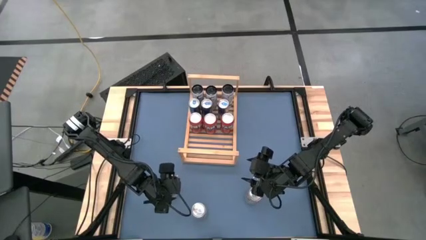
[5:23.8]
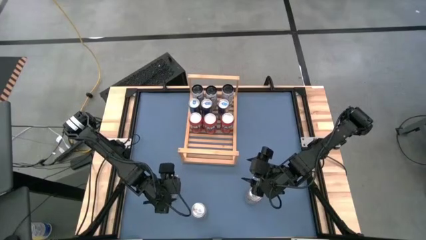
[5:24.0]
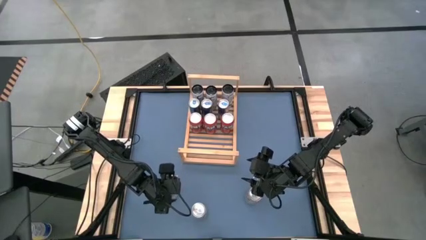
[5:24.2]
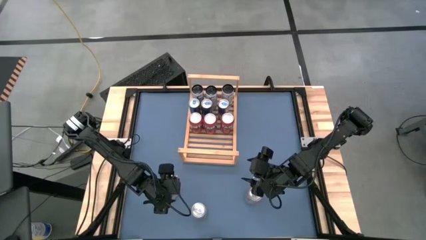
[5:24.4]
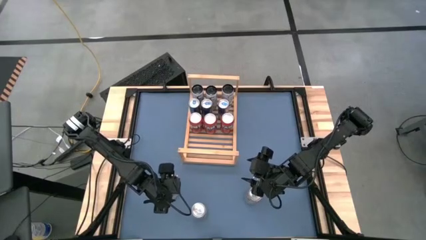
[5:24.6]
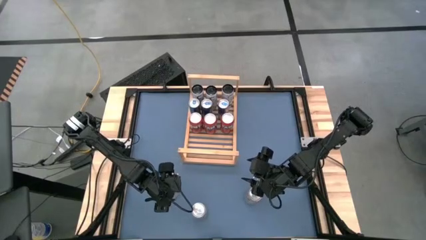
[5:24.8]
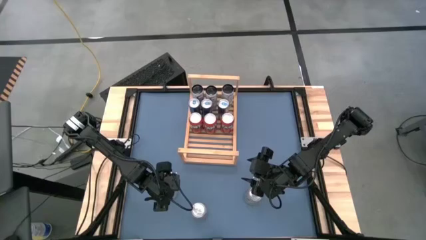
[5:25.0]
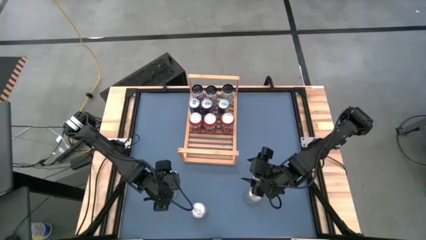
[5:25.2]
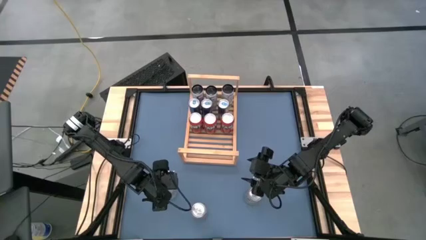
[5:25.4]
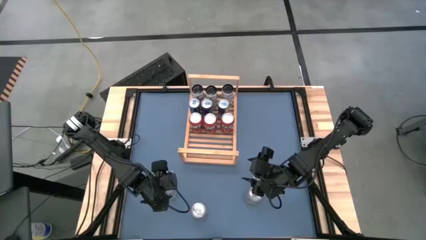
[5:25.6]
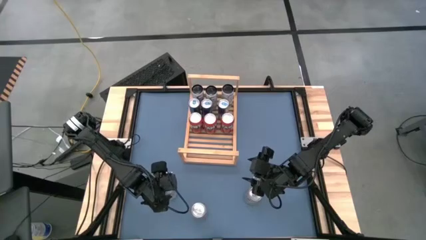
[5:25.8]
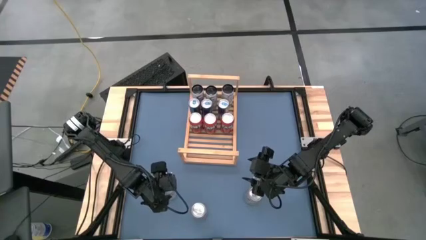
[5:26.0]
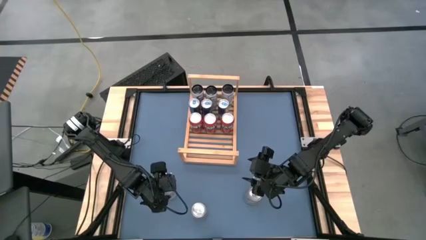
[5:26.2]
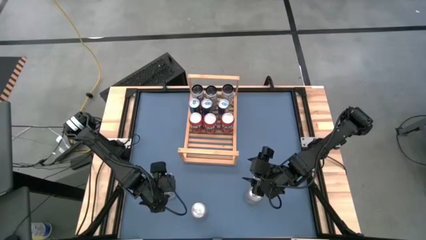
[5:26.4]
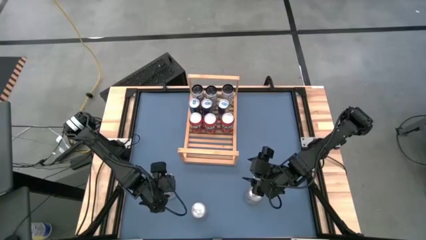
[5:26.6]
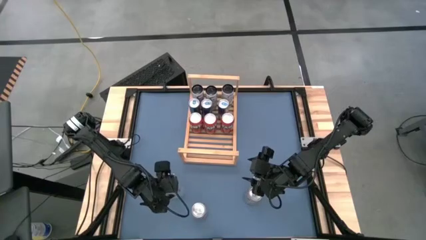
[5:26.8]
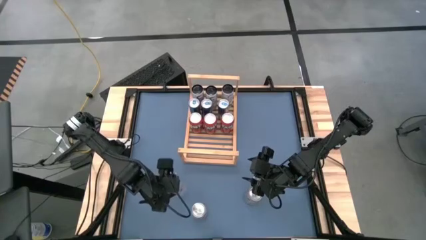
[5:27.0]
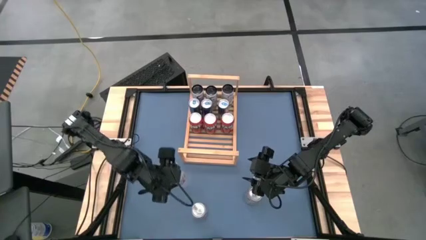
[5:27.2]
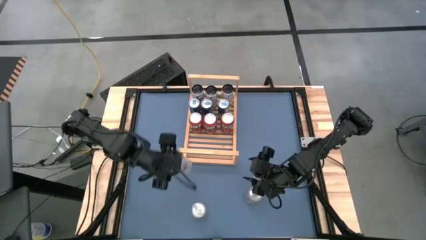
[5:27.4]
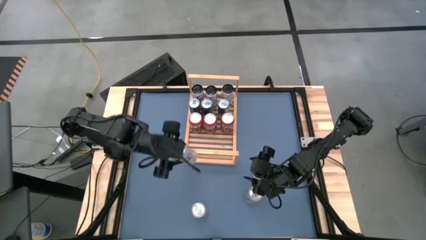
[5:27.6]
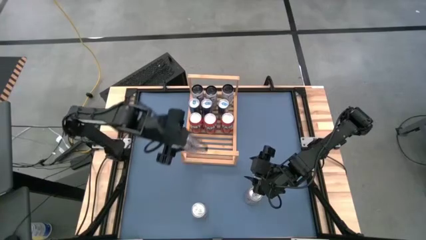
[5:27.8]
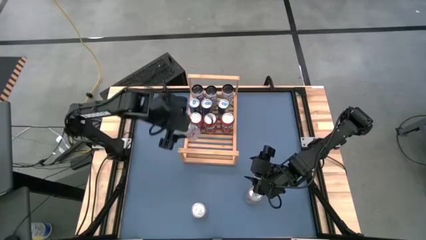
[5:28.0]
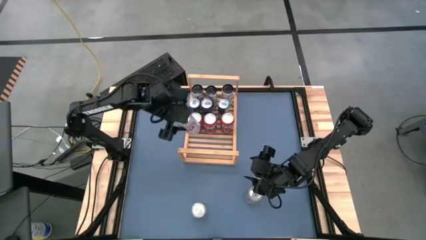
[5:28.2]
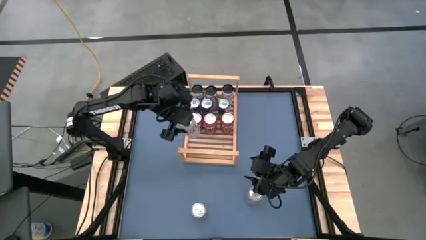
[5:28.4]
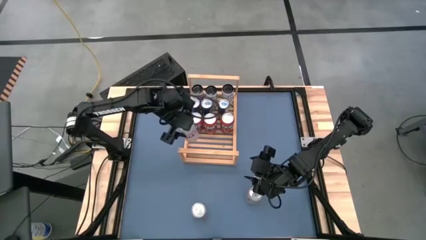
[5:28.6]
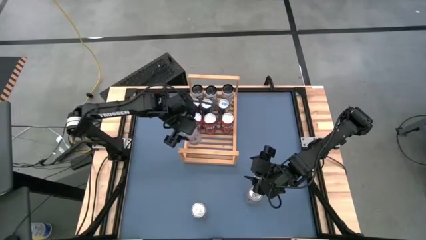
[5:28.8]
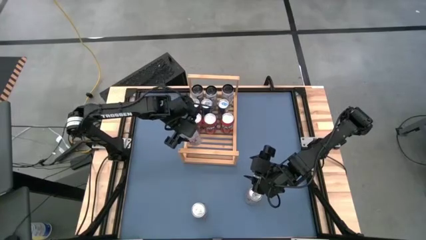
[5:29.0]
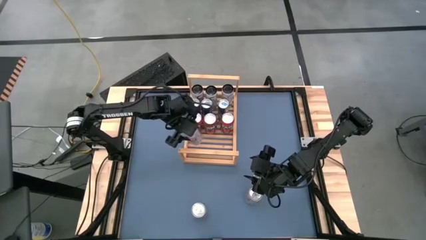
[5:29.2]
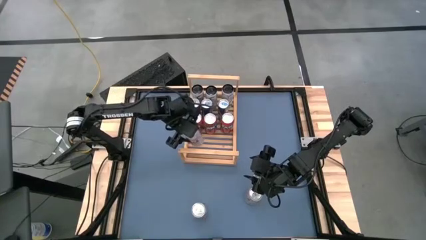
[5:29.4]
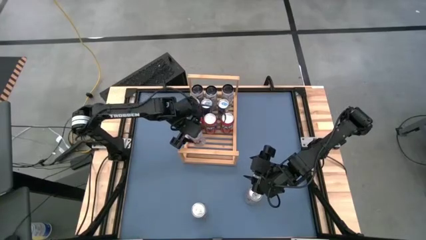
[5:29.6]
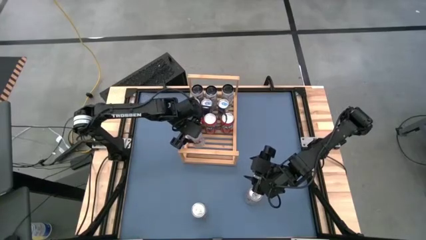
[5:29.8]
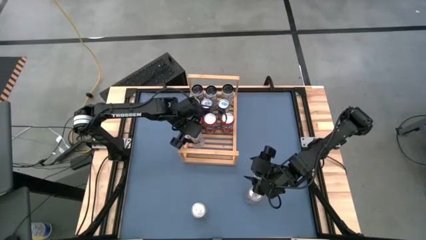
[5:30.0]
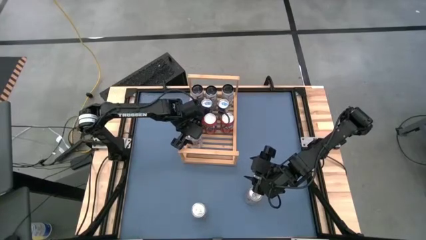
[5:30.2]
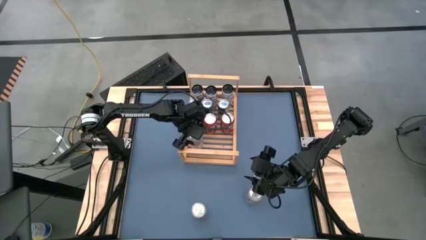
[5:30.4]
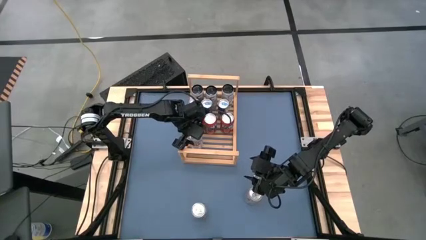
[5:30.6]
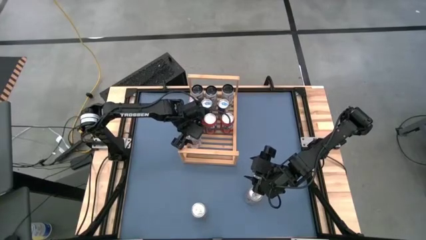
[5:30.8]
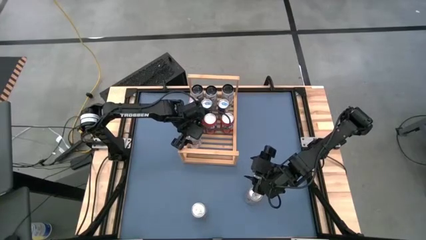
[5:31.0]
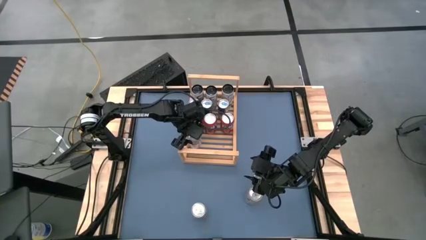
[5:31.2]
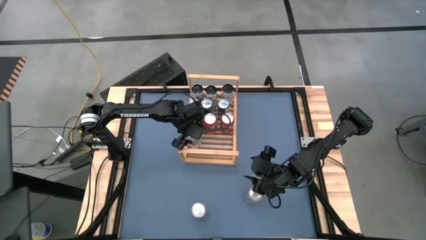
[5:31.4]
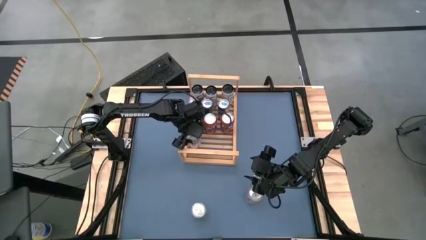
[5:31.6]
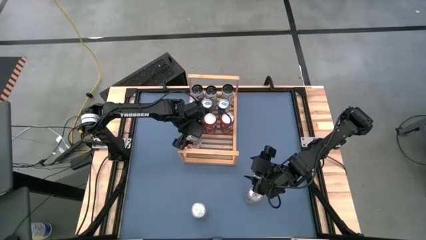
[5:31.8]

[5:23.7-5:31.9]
Task: Place canned beverage on shelf
Put the top silver can on the shelf

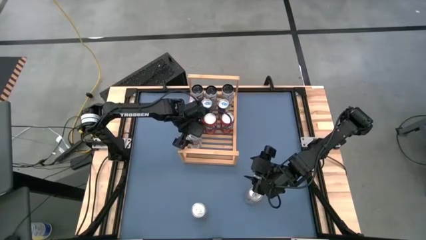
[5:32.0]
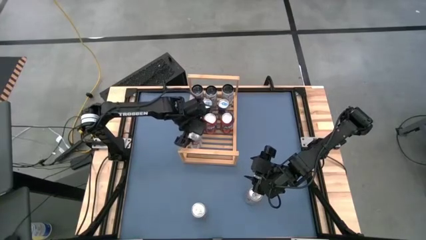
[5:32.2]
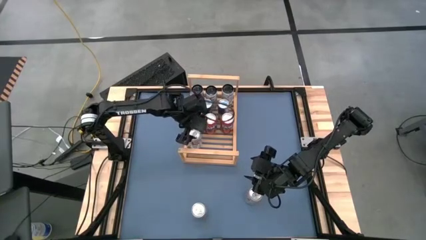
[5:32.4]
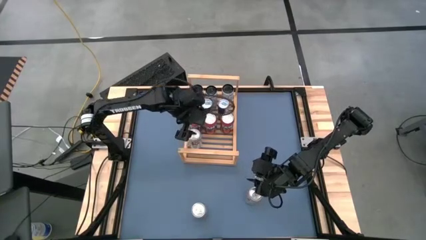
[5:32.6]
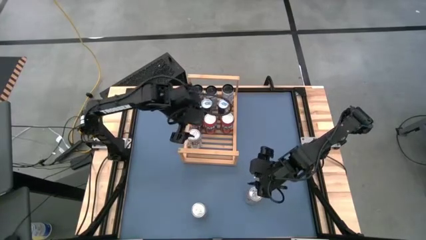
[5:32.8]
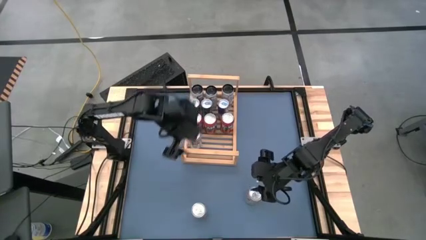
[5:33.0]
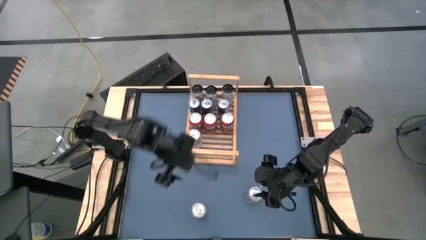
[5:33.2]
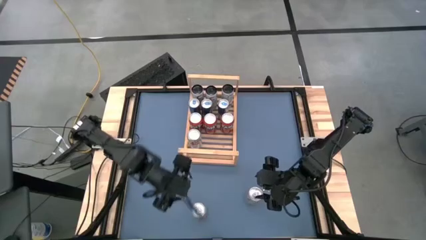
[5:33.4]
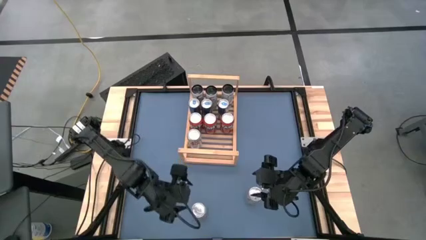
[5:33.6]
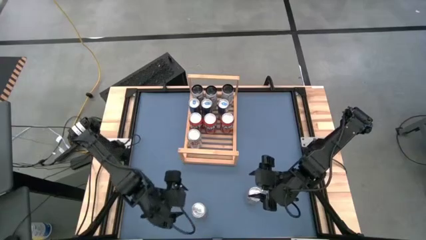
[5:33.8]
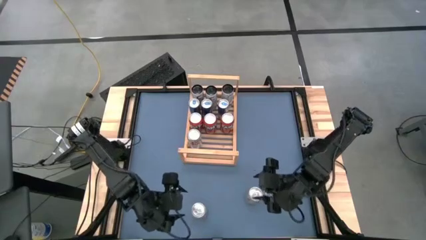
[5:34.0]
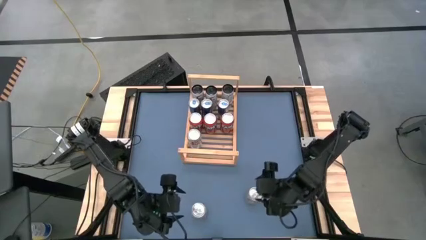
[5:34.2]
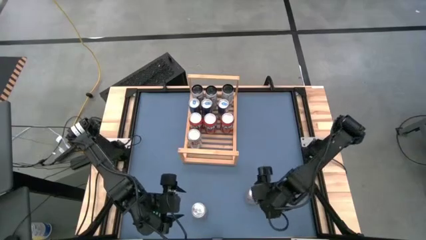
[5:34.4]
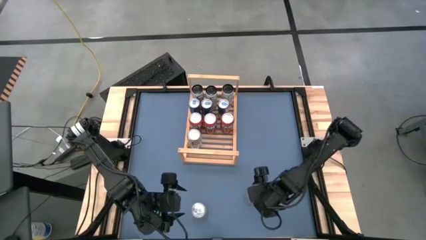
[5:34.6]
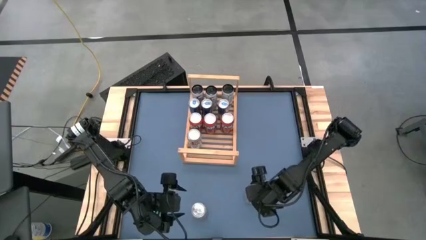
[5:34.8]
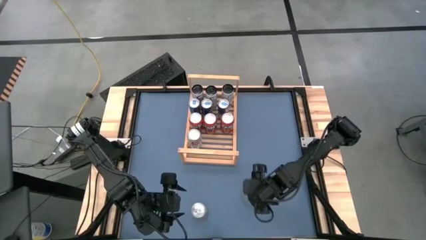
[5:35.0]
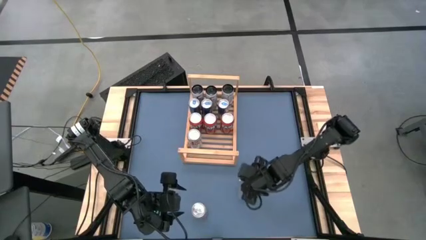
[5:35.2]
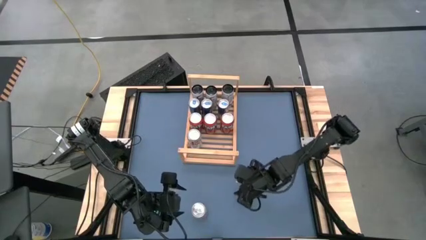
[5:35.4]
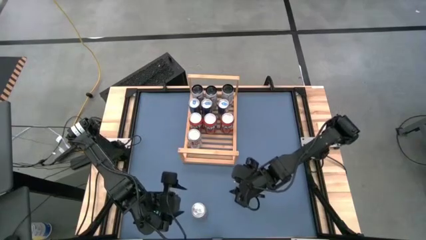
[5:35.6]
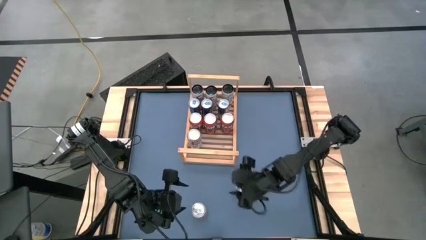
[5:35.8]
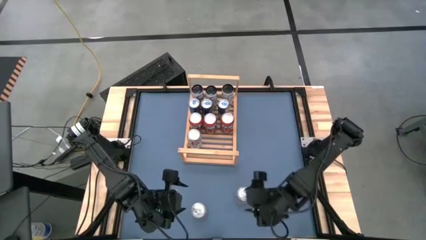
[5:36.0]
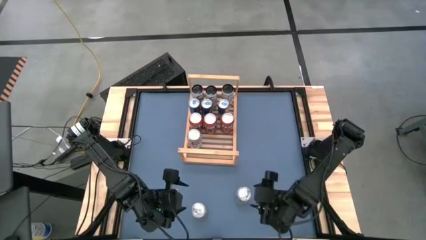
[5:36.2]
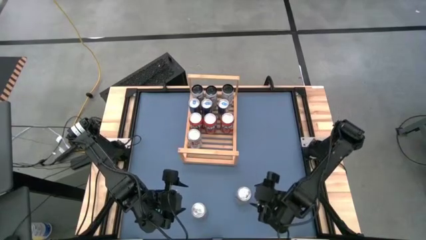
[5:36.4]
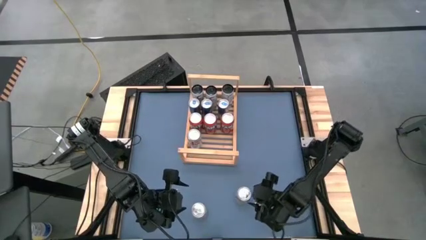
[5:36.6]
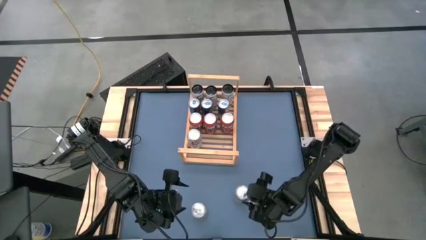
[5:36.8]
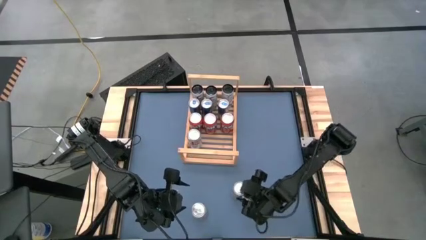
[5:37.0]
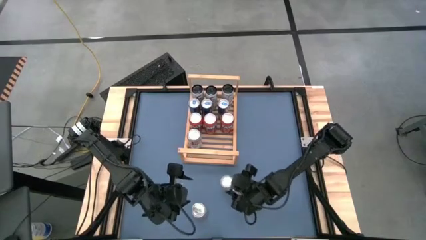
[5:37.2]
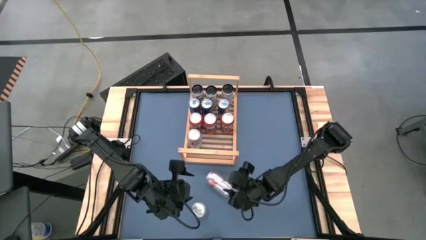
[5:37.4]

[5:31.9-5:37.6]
Put the right silver can on the shelf aligned with the other silver soda can

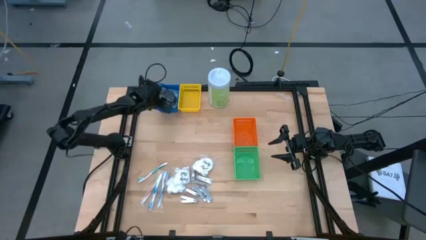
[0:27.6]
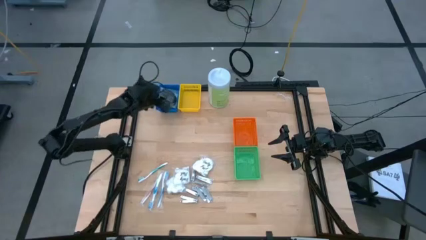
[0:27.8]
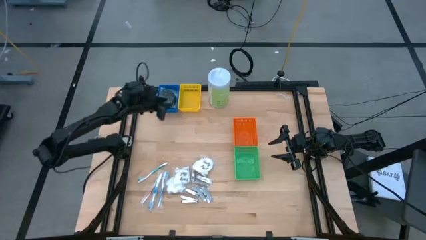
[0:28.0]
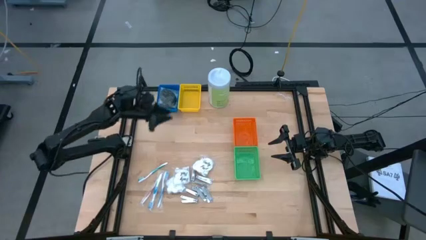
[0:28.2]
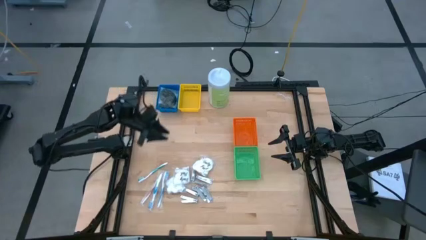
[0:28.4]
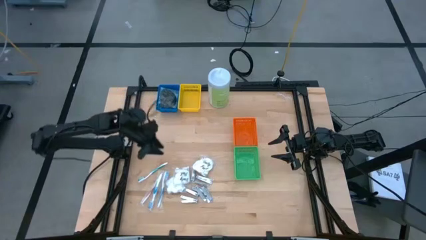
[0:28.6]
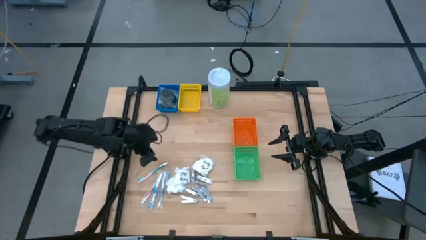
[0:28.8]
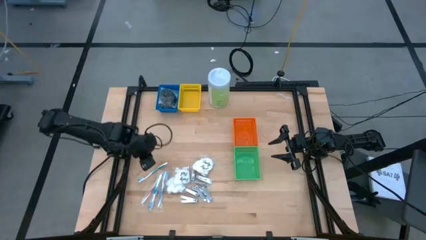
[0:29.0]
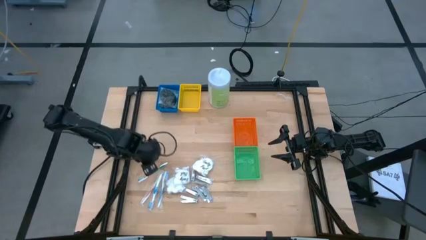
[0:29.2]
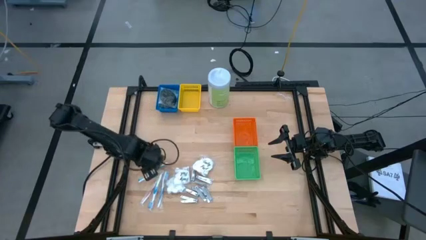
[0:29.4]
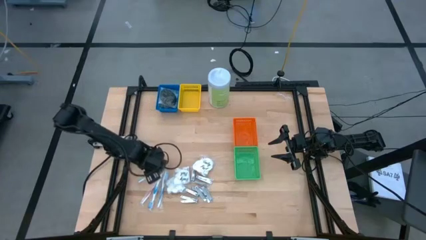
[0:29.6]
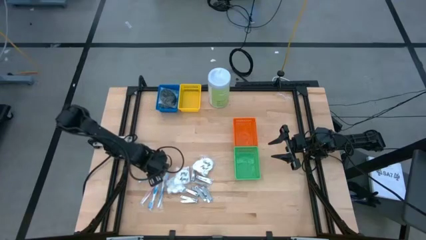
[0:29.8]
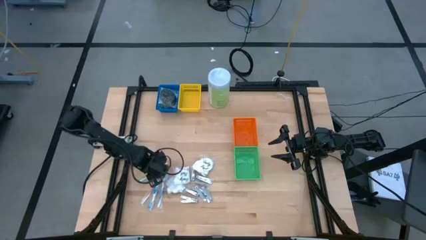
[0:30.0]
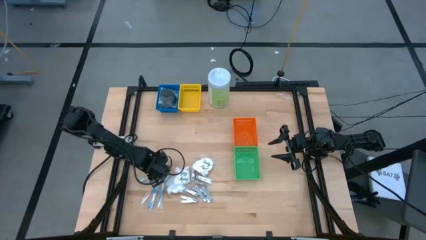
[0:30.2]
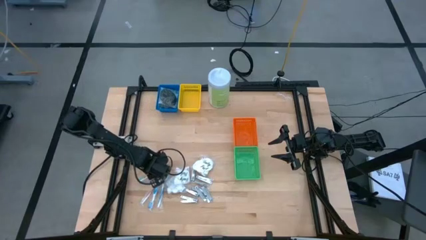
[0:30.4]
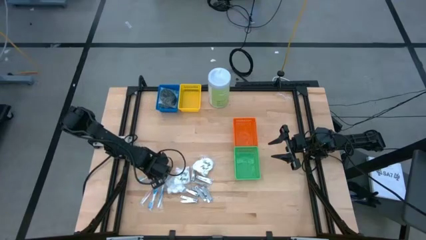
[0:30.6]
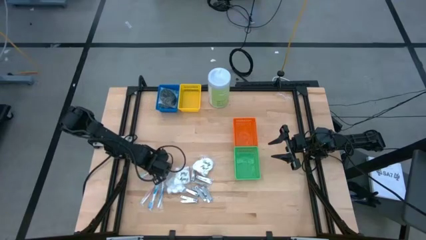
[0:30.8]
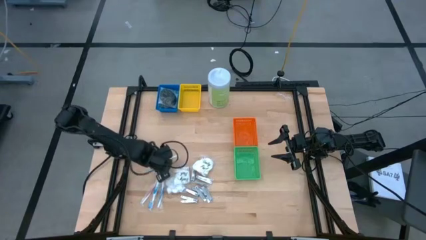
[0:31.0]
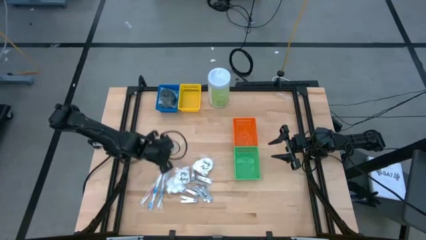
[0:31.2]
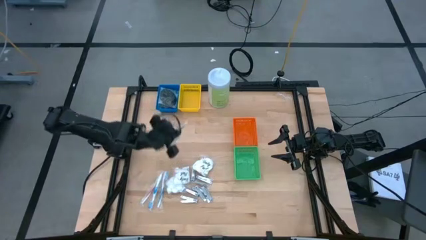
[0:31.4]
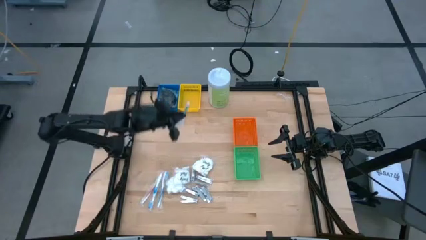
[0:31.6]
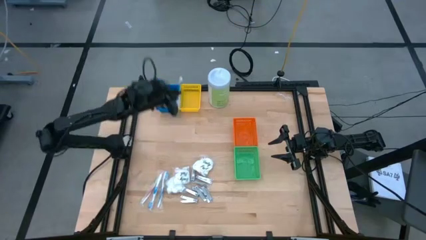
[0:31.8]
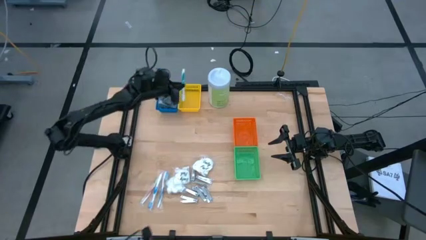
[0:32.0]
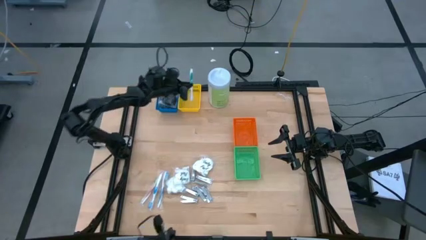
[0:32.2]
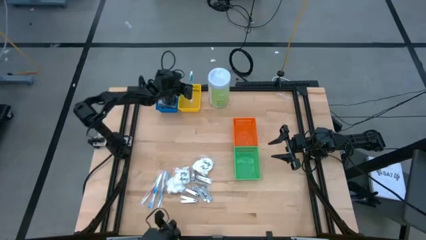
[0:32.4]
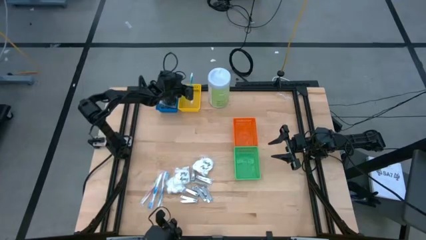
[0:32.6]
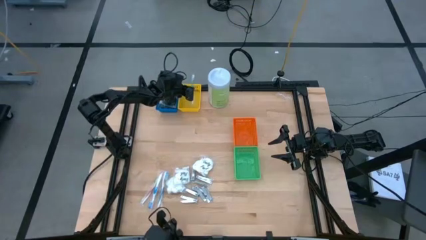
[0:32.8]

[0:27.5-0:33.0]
Task: Pick & Place Travel size toiletries
Put the green toothbrush into the yellow bin
